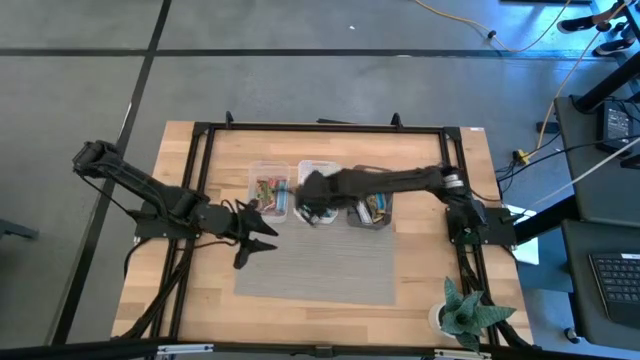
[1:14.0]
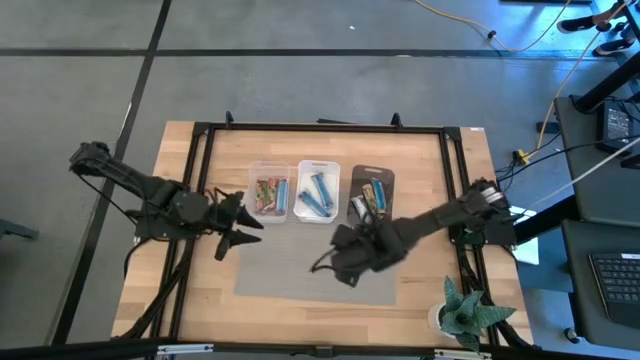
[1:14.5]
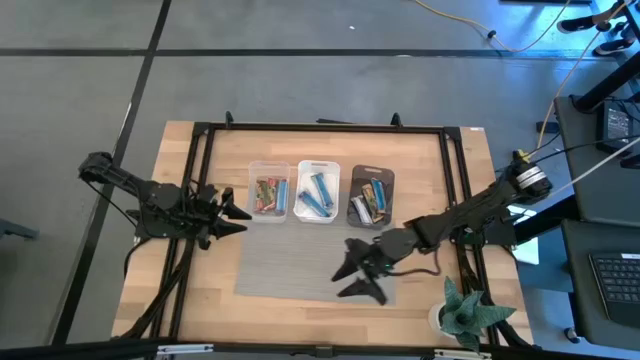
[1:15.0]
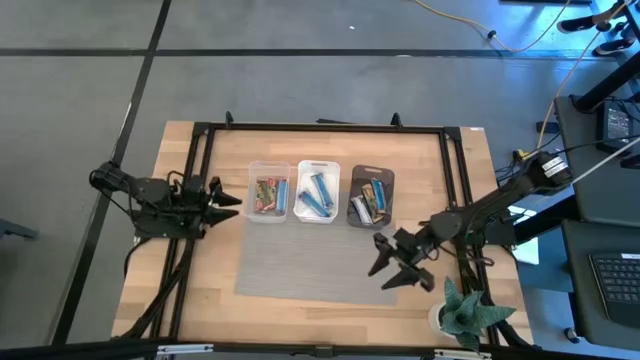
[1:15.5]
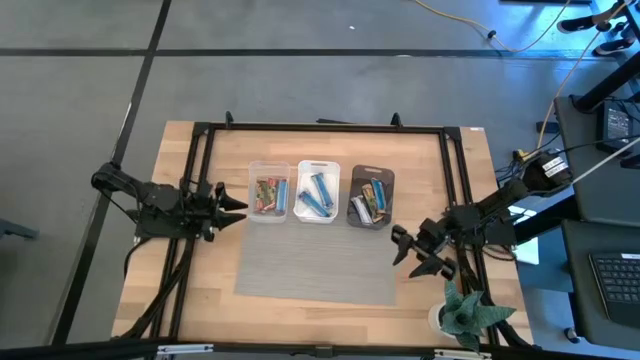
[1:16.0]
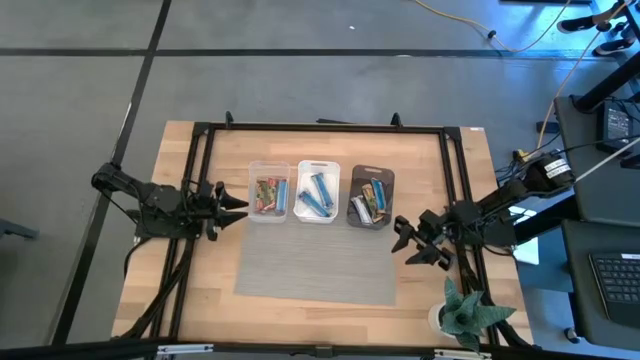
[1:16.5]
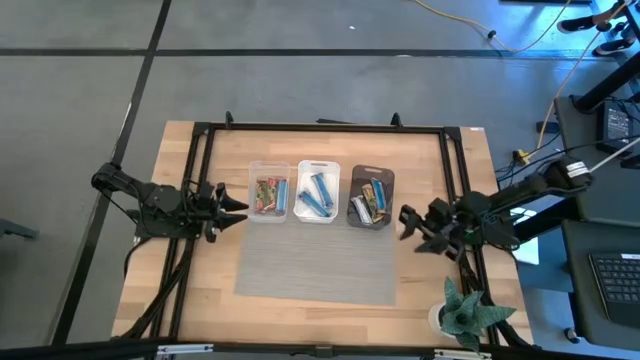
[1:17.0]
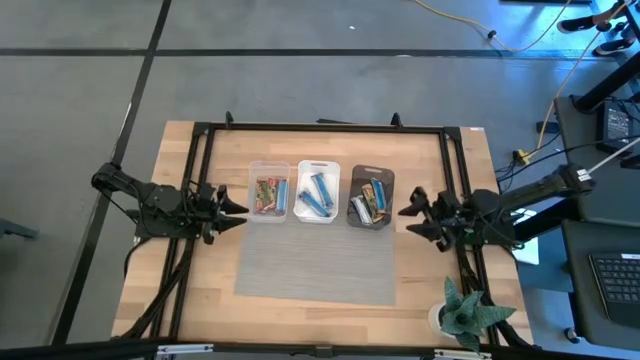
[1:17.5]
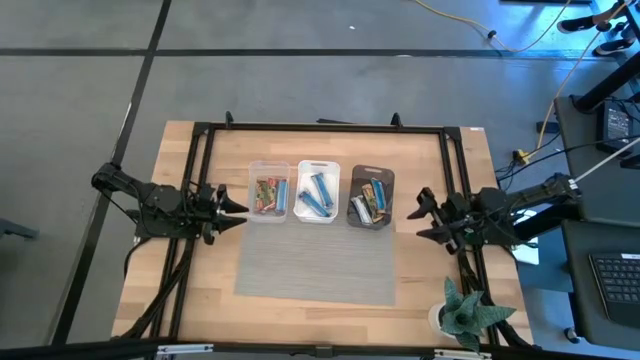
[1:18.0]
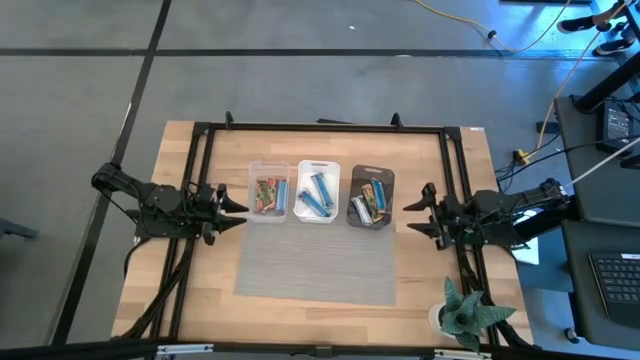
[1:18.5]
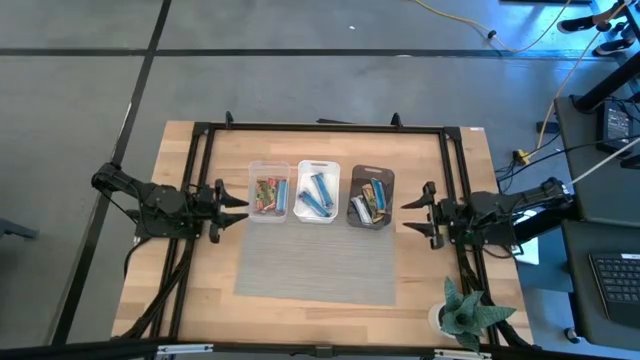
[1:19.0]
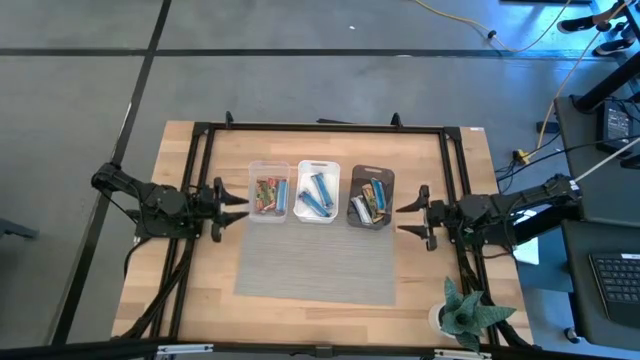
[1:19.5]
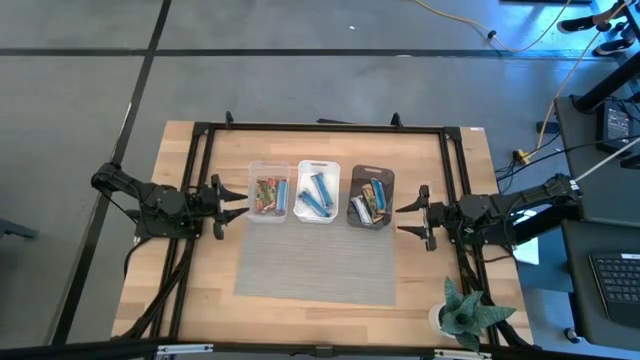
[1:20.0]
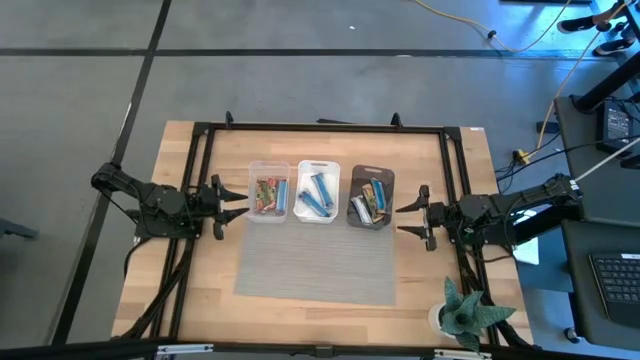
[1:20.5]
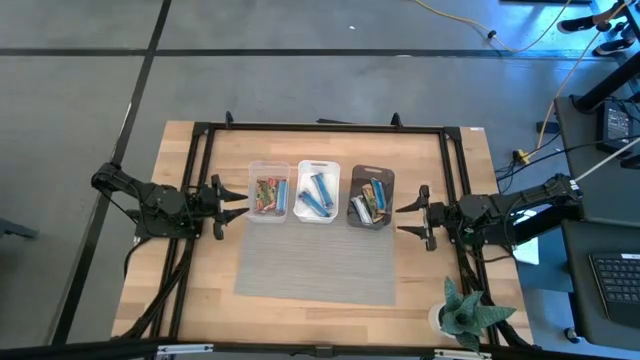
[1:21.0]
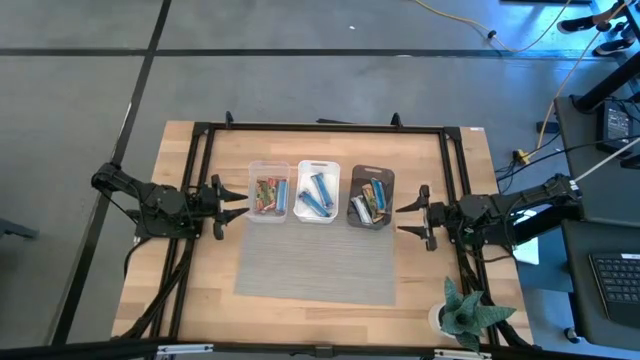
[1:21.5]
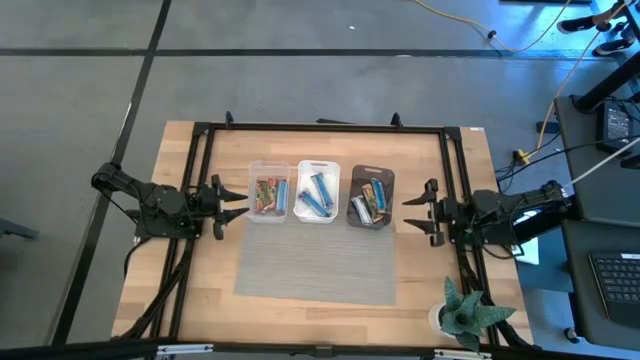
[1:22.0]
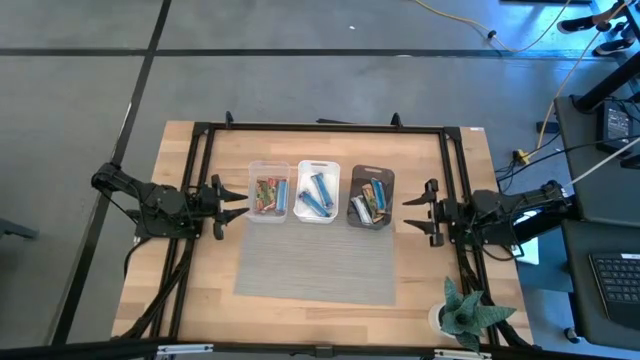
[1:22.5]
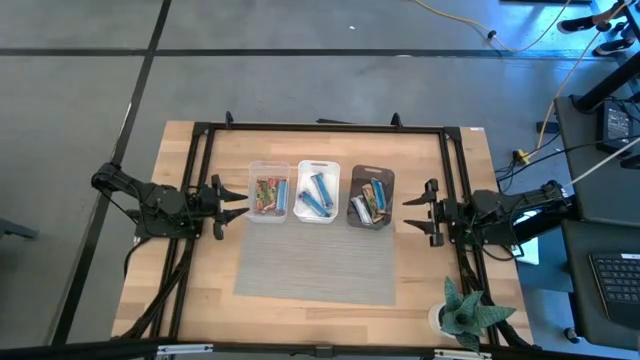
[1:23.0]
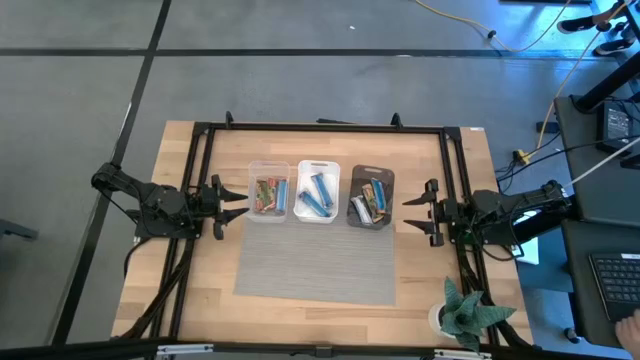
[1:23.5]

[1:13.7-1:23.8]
Task: Pick and place Granola Bars by type
Return to Home Position

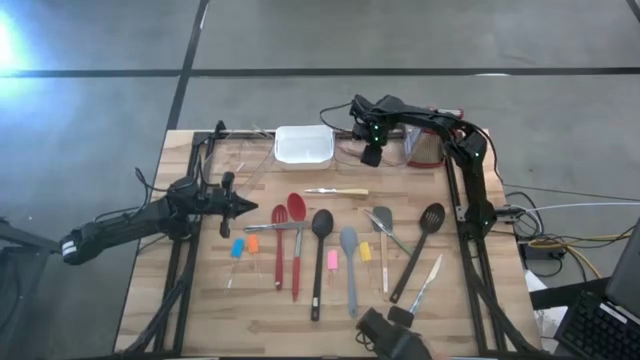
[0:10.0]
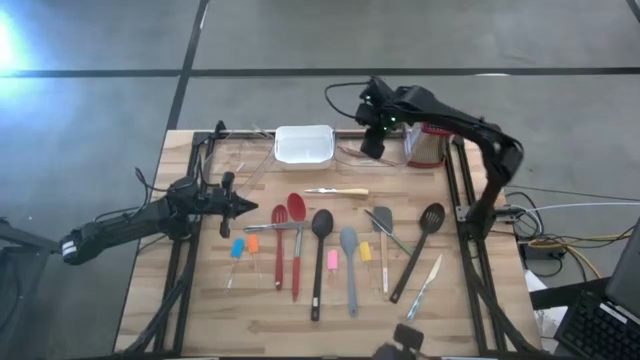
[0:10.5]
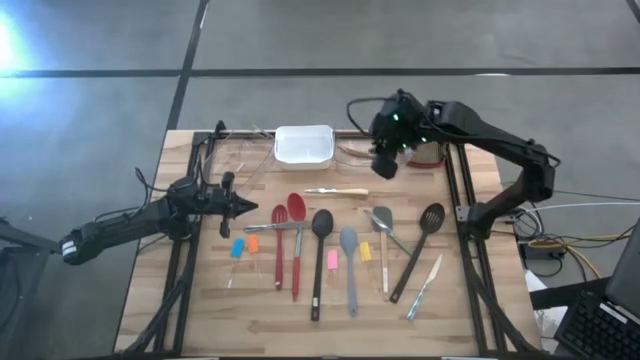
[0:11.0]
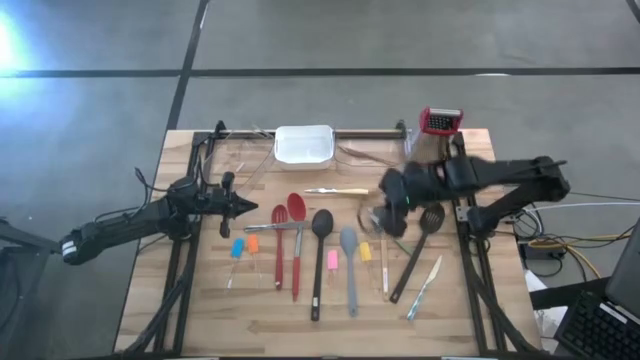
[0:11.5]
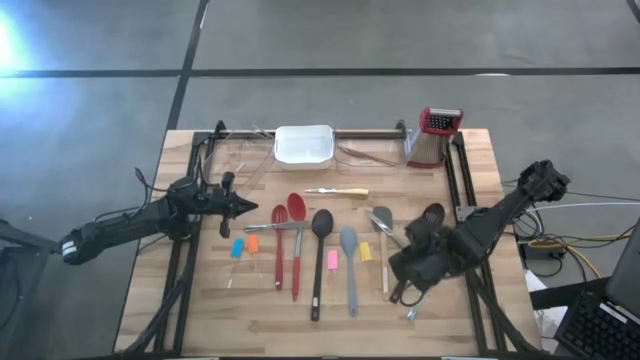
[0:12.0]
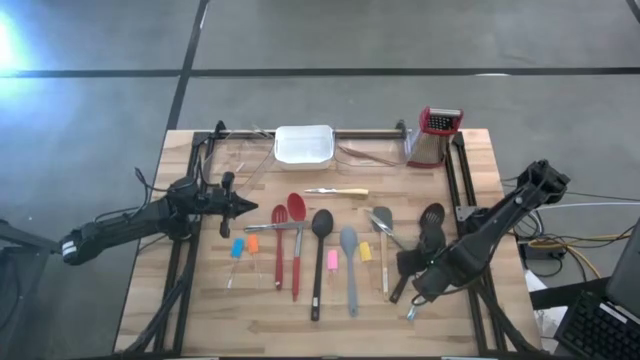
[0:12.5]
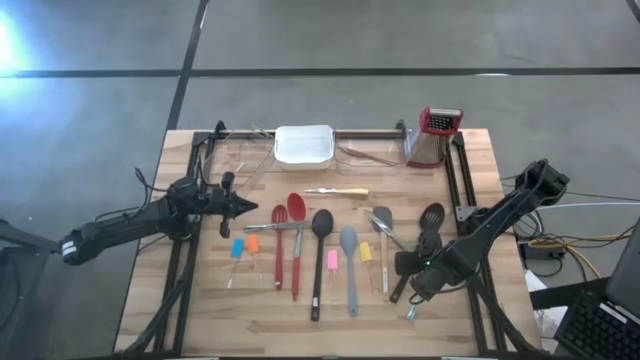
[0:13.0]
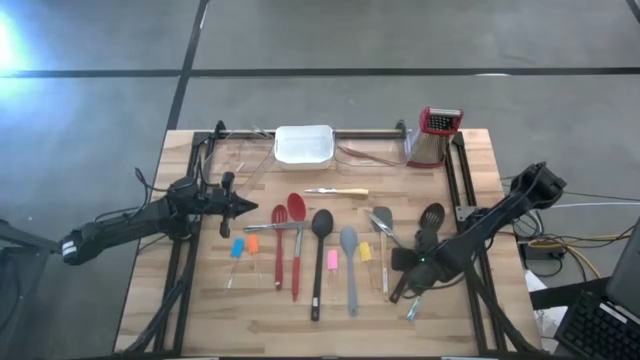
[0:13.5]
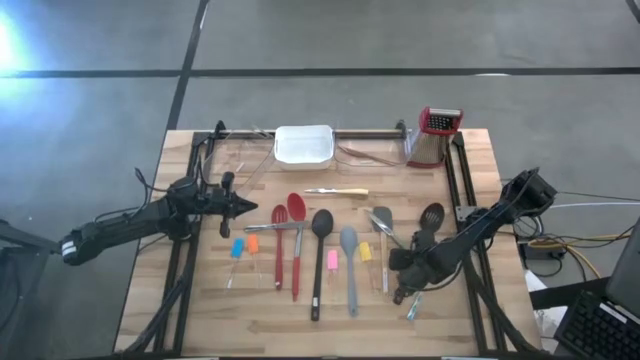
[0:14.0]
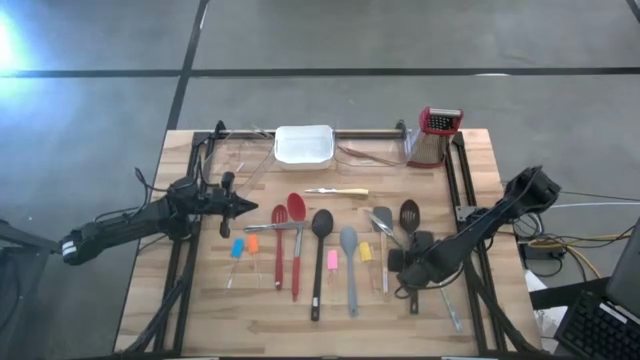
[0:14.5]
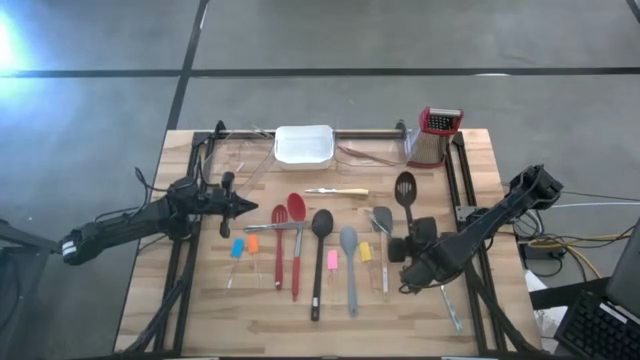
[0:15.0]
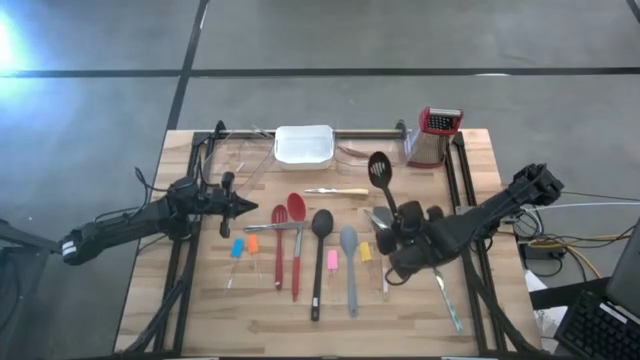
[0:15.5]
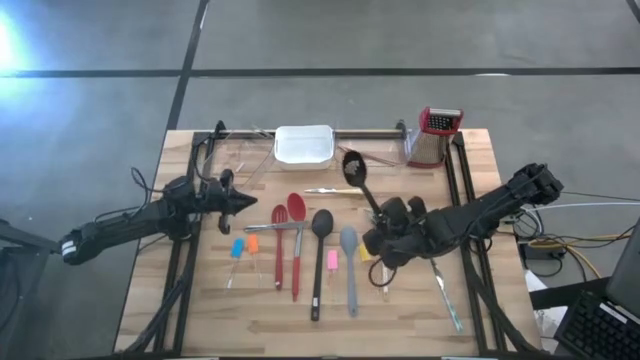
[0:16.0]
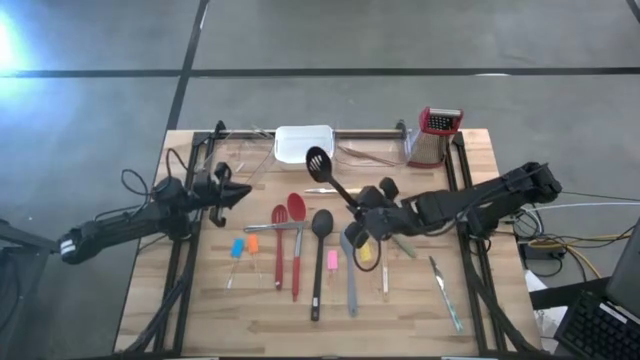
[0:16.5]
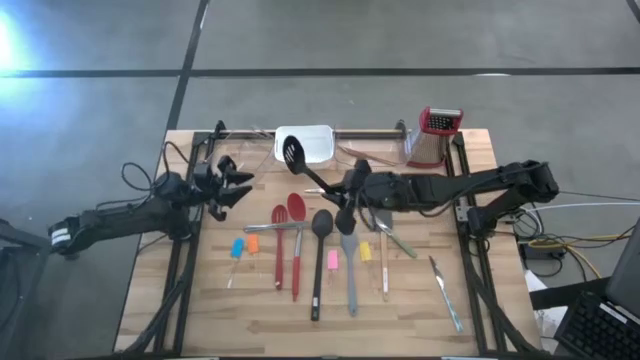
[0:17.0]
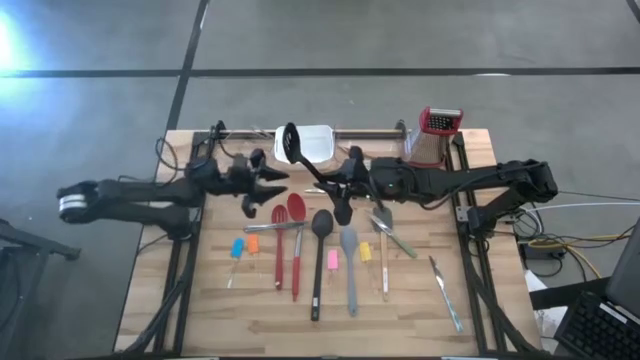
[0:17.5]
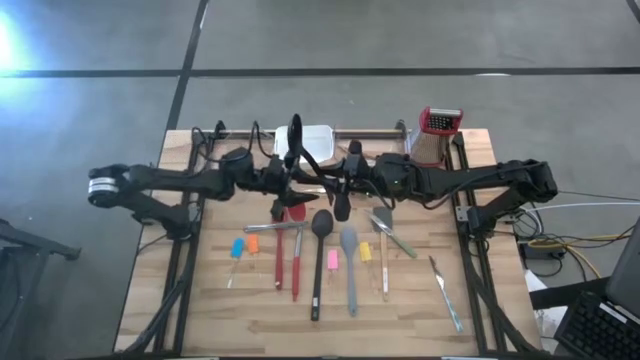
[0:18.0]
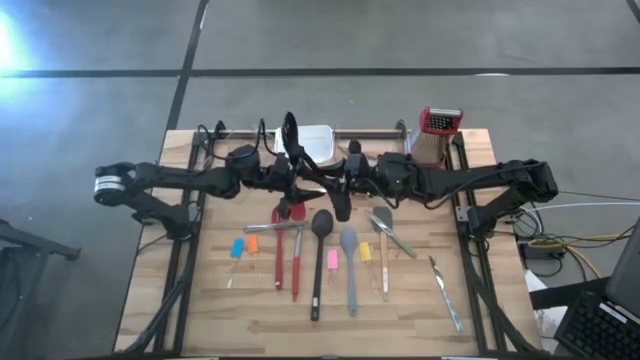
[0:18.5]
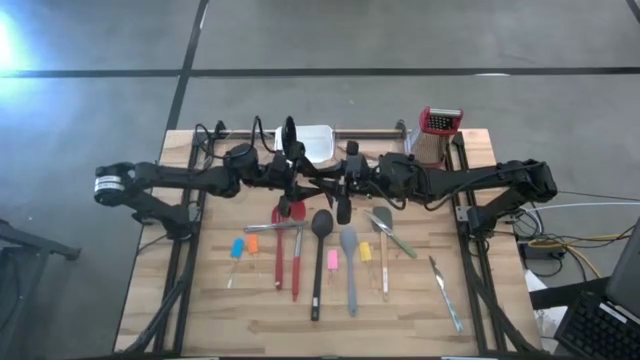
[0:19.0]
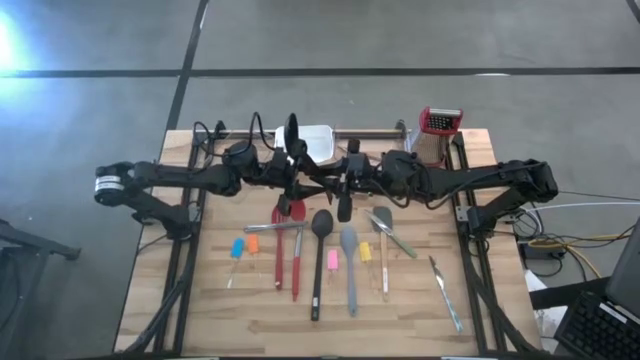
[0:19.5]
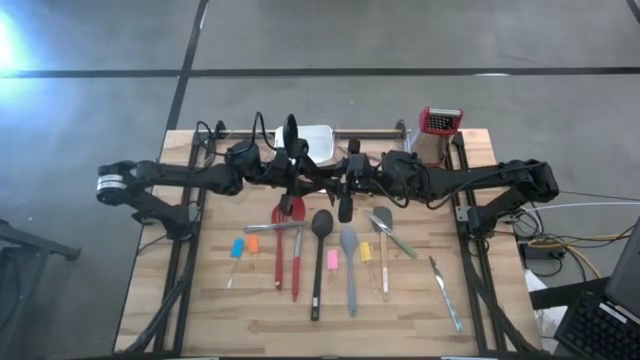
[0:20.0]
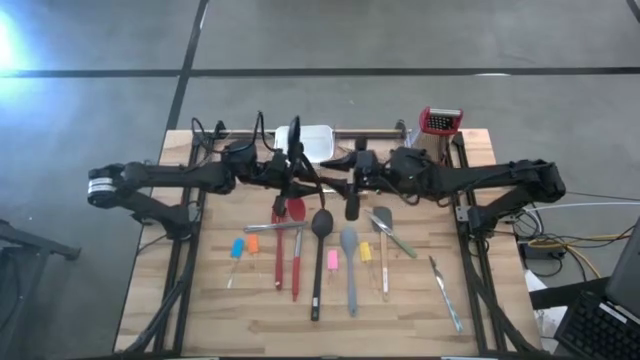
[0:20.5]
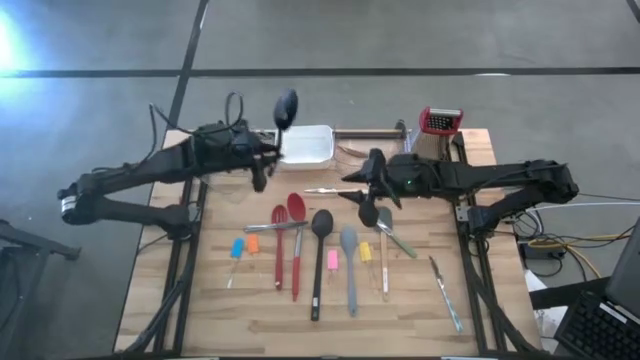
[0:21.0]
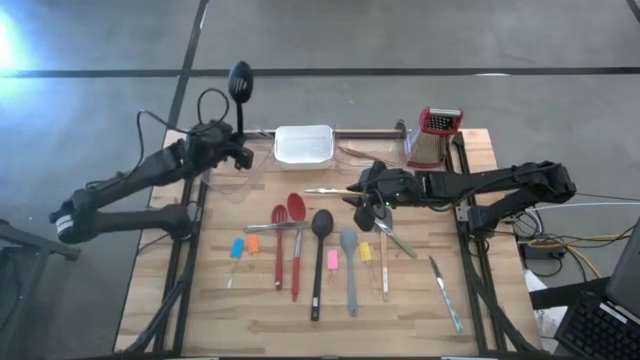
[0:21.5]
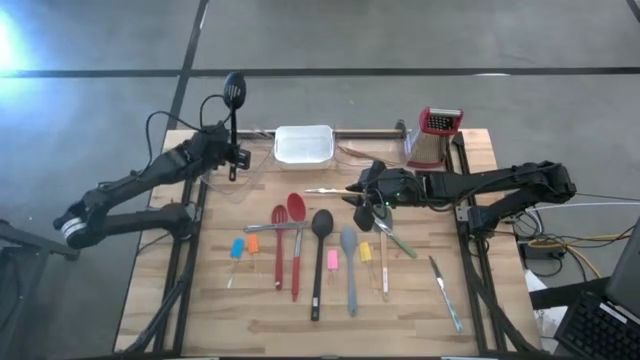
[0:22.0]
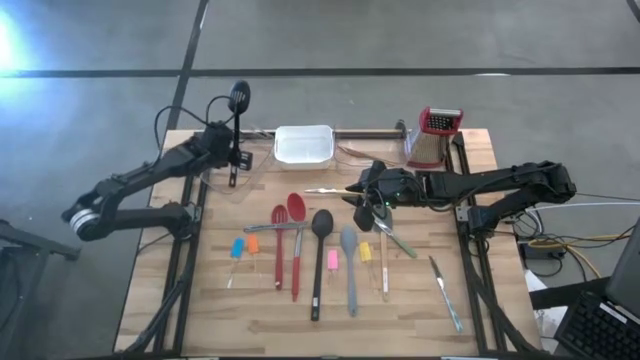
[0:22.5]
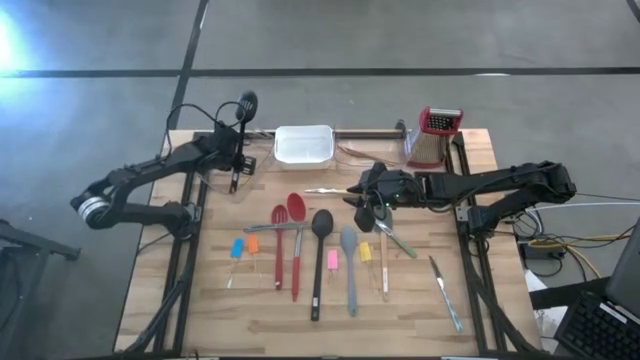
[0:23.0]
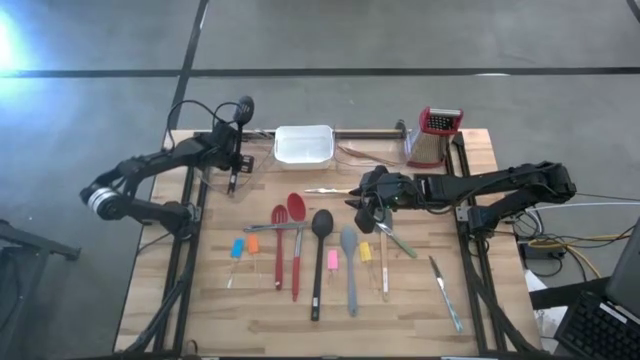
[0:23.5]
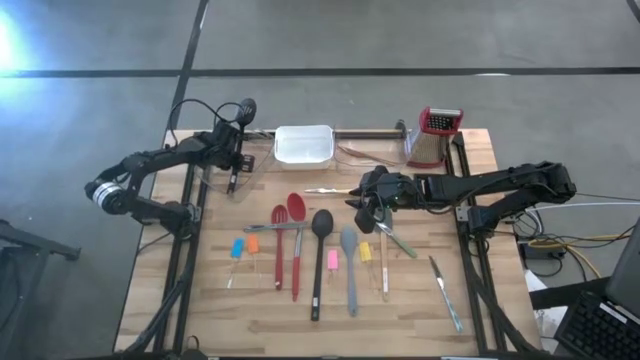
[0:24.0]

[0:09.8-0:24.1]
Task: Pick & Place Kitchen Items
Put the black slotted spoon into the left transparent bin
